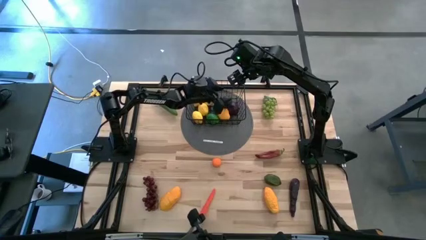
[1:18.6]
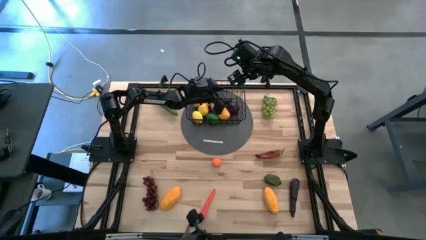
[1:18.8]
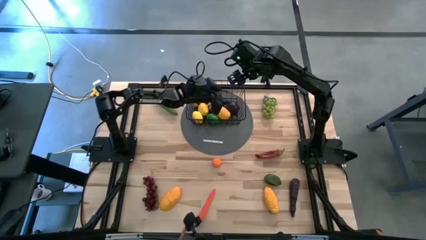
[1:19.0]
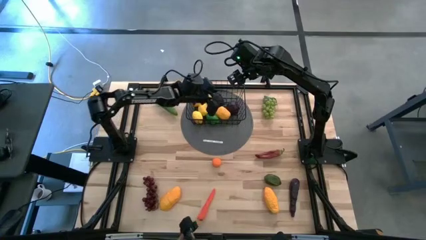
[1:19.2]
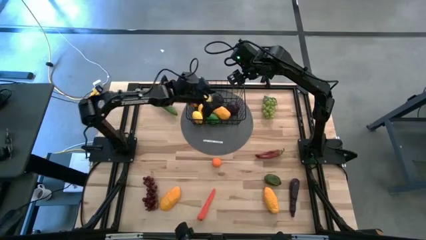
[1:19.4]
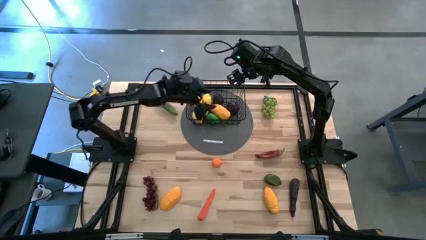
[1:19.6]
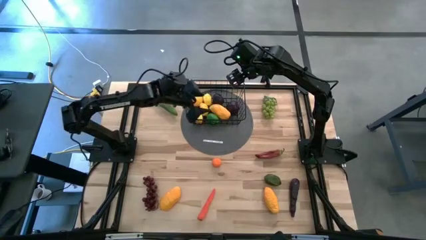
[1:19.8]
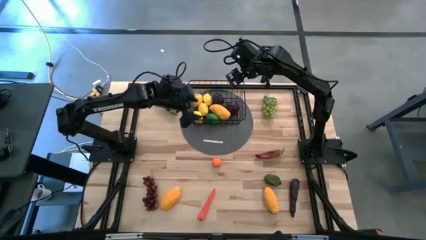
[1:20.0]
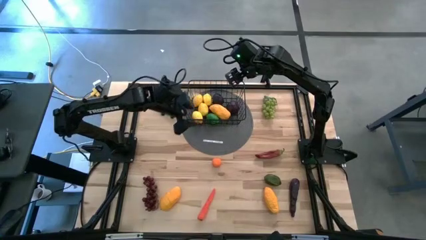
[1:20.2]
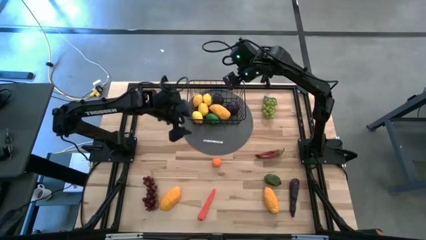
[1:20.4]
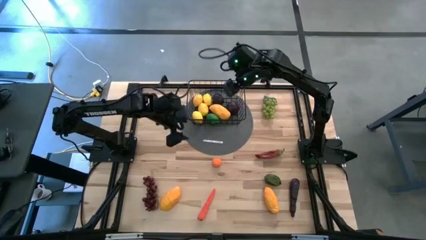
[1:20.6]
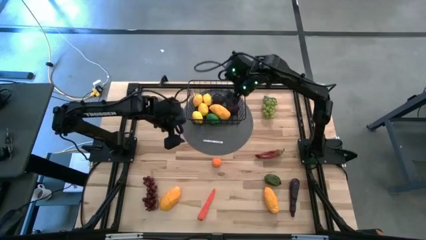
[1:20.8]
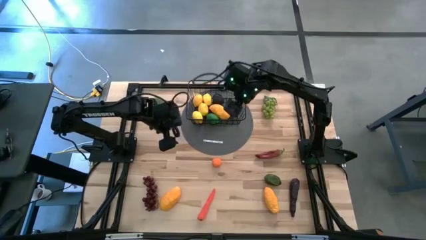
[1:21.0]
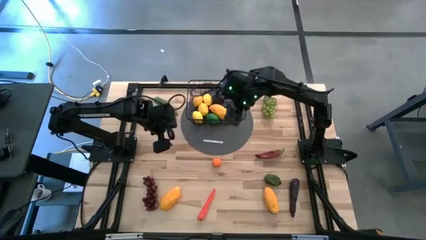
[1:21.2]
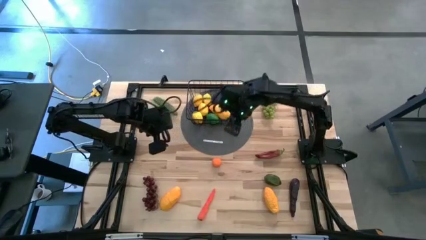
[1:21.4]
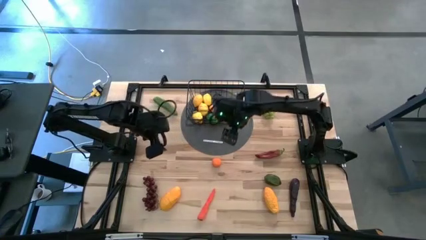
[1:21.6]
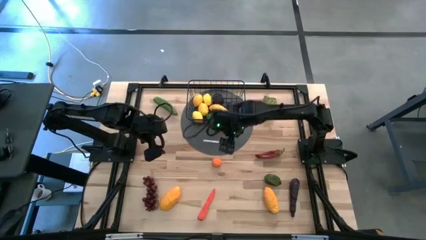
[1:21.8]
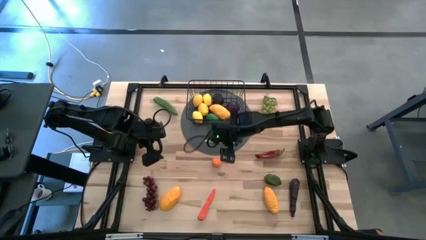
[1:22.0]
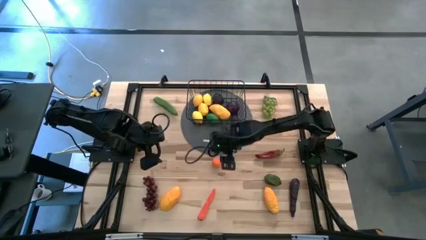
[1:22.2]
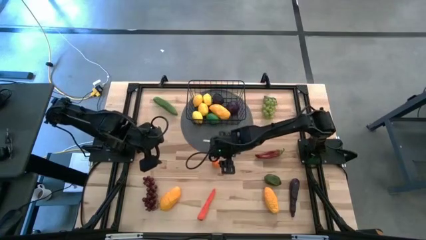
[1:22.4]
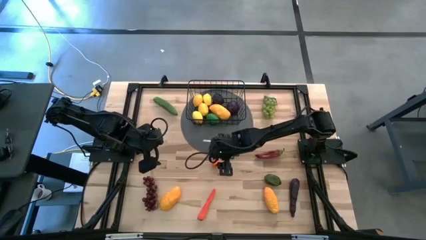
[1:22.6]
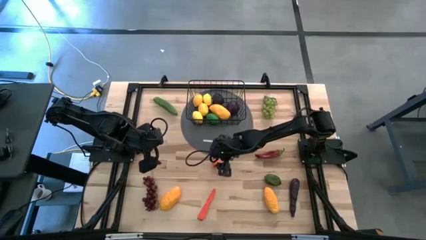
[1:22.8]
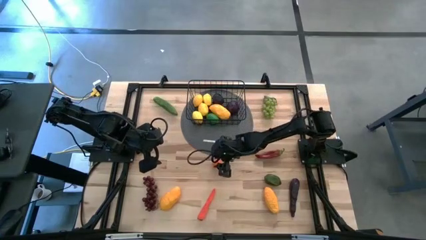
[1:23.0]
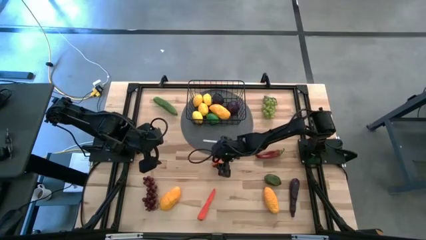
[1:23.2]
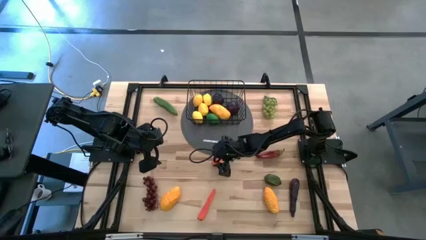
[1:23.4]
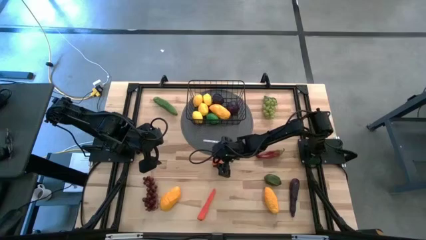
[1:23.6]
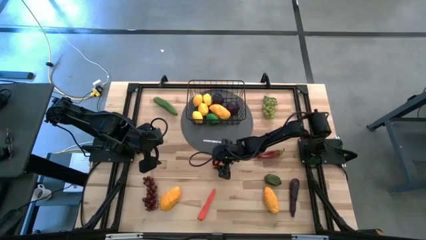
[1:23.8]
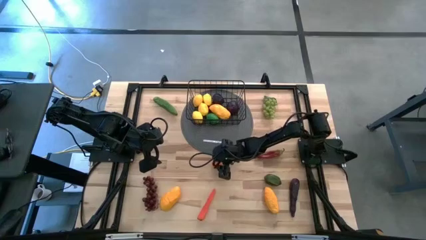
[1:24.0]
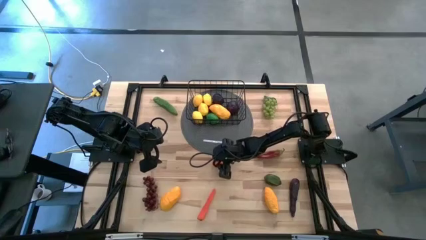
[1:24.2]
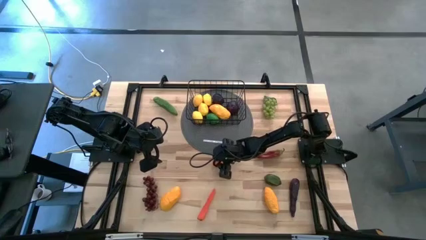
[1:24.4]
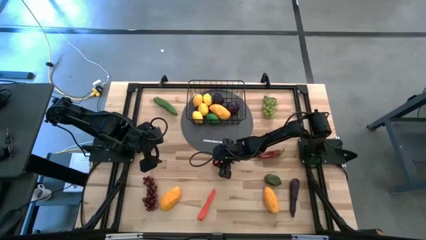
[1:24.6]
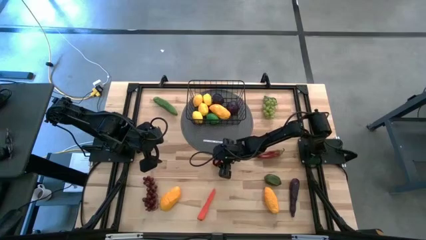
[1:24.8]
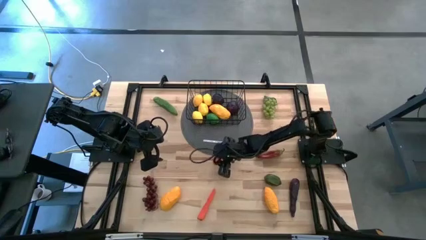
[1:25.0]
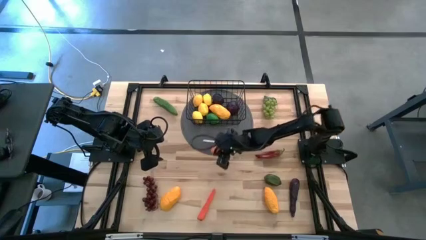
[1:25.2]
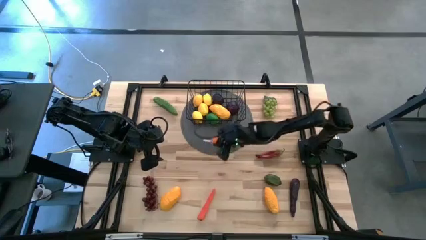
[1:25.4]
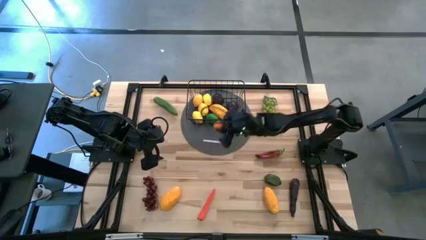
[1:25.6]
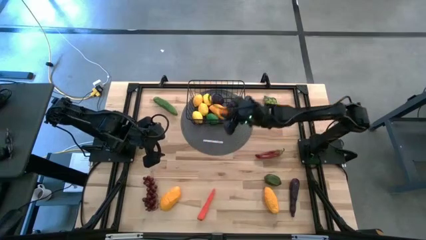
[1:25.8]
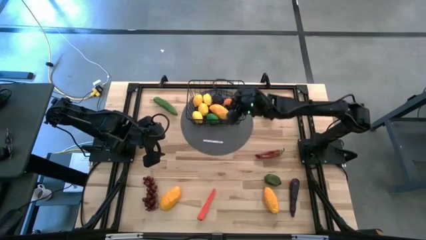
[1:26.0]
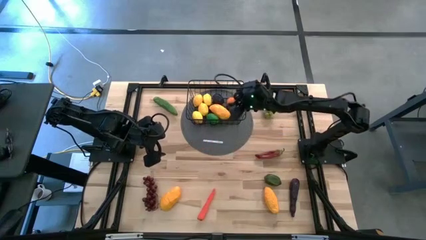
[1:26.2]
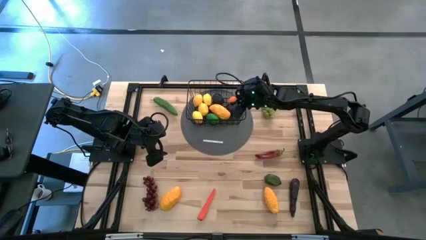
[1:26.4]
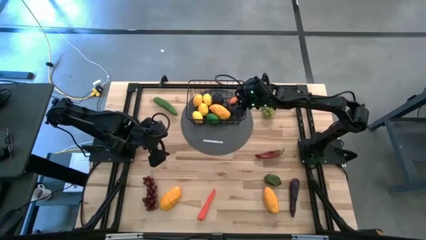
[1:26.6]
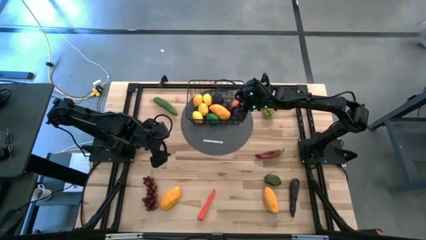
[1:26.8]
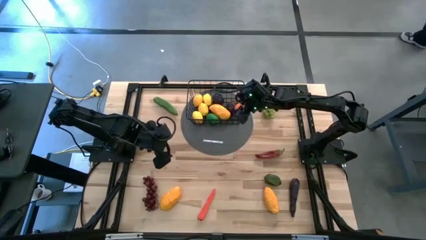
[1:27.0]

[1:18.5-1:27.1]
Task: Build produce basket
Put the orange into the basket

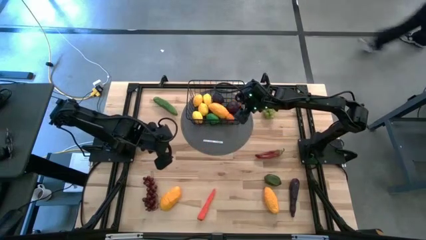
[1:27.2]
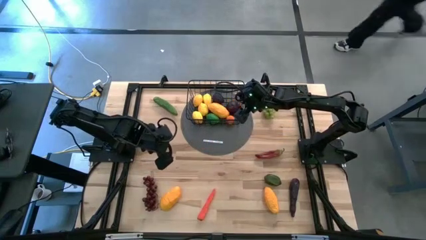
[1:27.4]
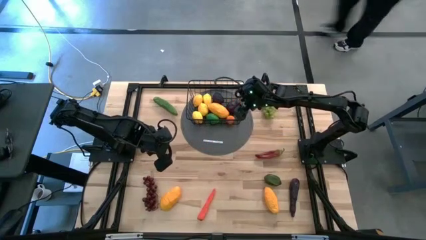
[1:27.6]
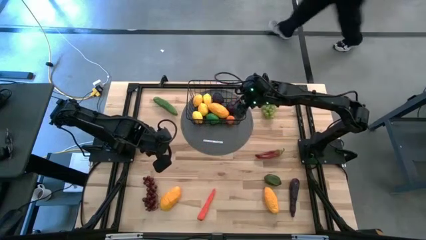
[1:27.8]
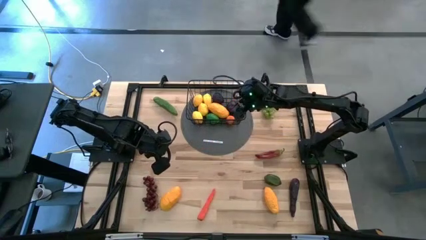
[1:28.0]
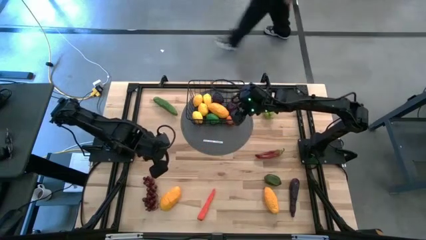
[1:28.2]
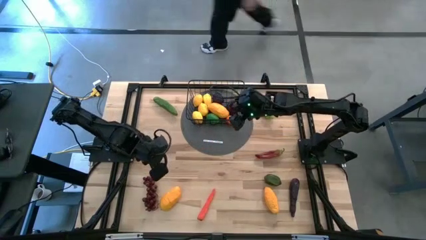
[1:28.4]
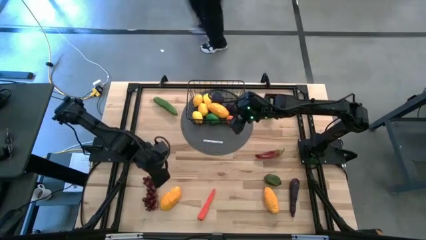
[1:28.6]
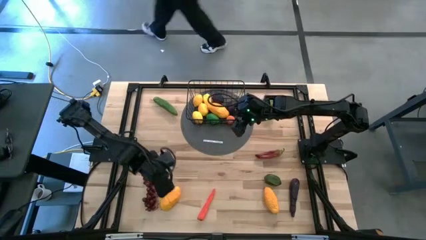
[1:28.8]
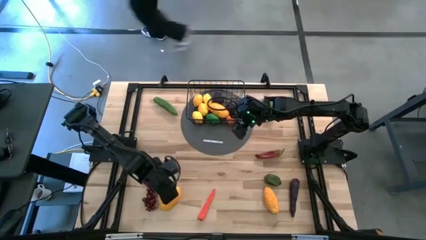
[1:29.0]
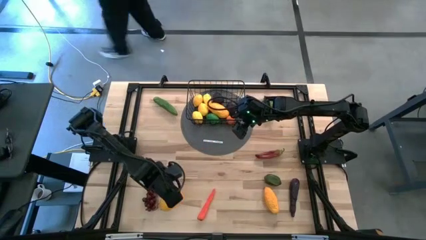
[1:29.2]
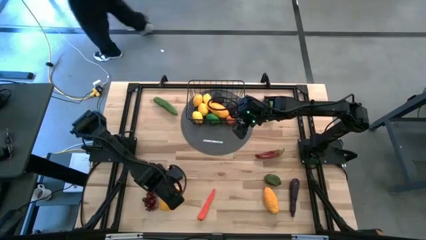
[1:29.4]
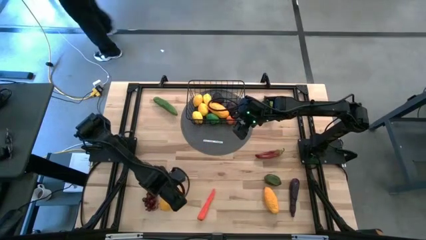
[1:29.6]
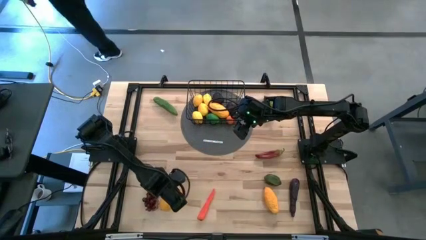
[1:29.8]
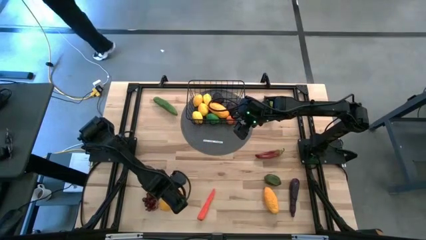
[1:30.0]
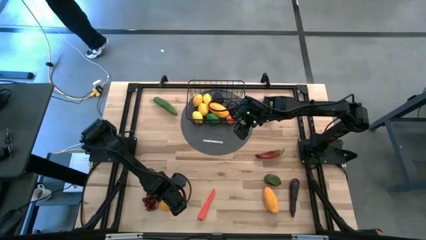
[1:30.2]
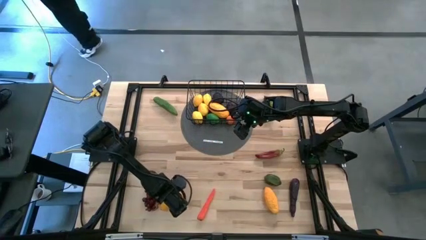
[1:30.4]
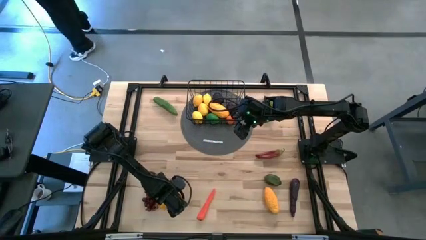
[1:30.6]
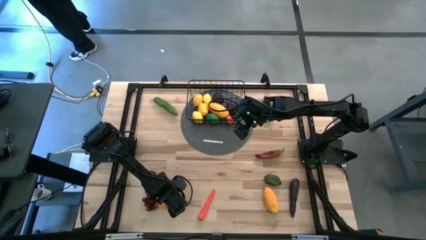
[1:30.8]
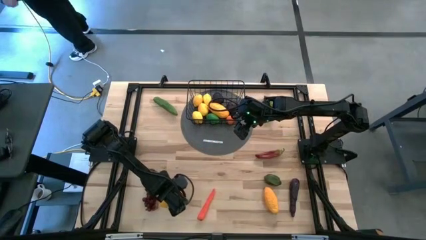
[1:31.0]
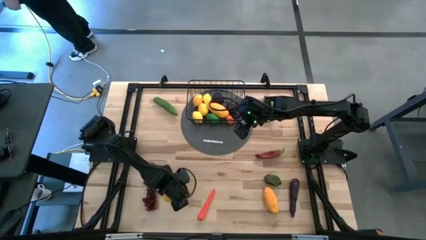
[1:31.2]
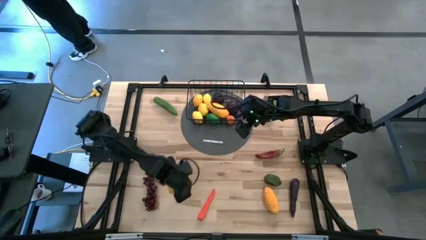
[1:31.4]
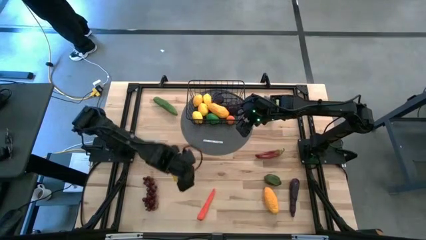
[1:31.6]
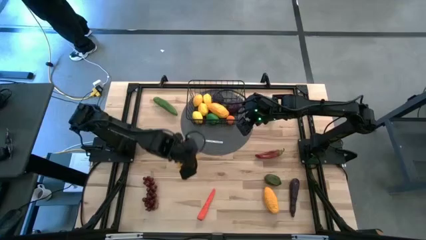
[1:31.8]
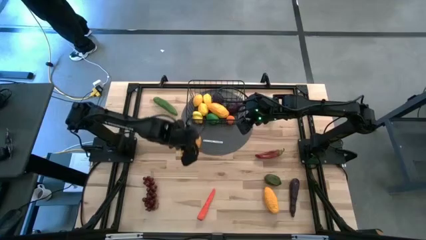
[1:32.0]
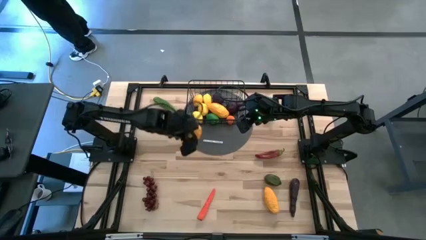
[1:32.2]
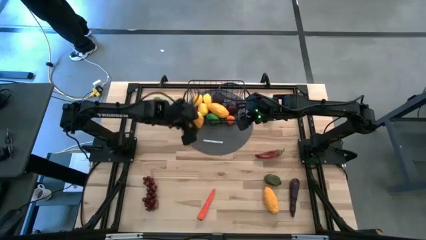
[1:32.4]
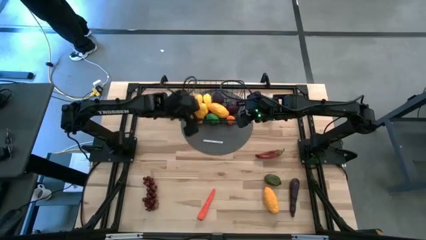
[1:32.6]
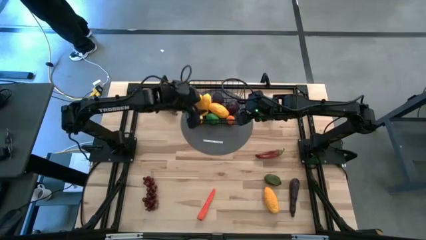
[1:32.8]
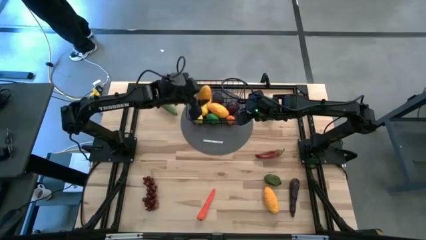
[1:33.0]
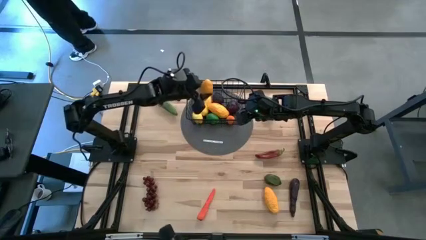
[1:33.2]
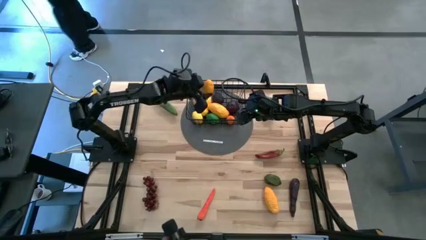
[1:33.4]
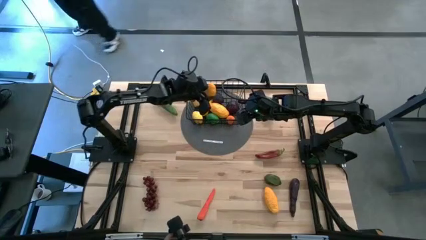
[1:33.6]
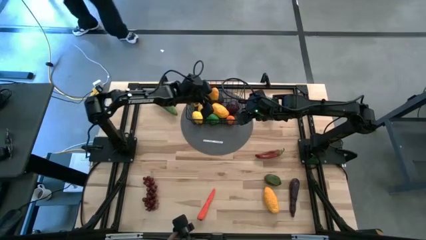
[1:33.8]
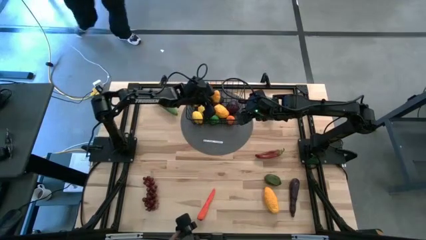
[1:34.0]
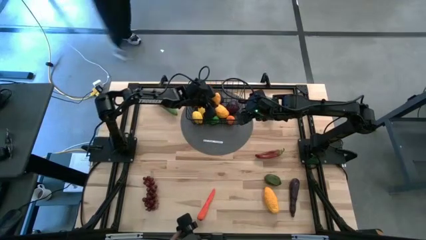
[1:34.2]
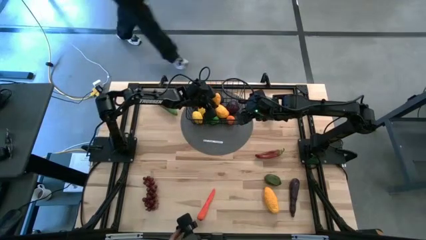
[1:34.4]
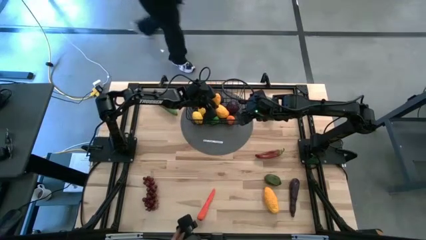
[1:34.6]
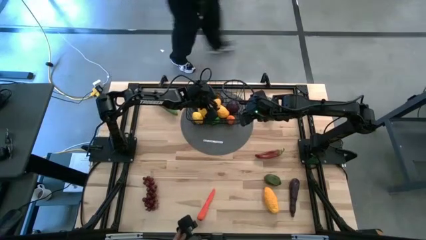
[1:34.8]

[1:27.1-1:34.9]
Put the left yellow mango into the basket
